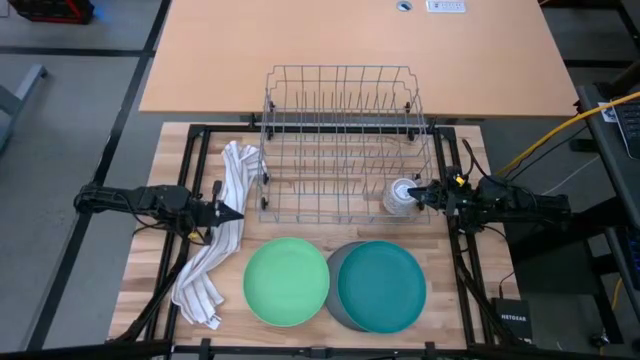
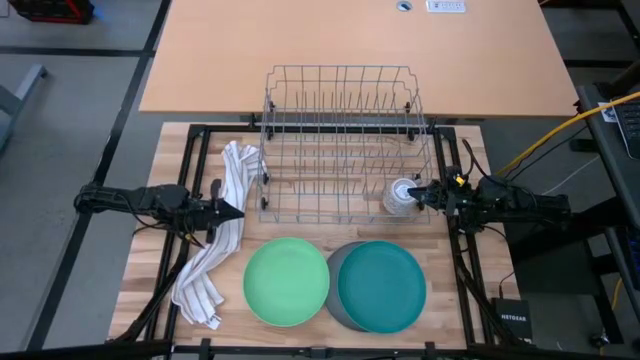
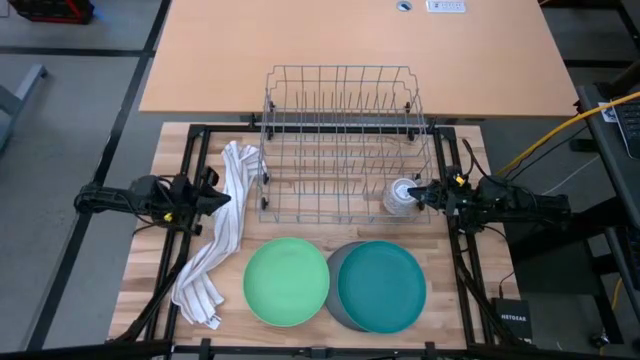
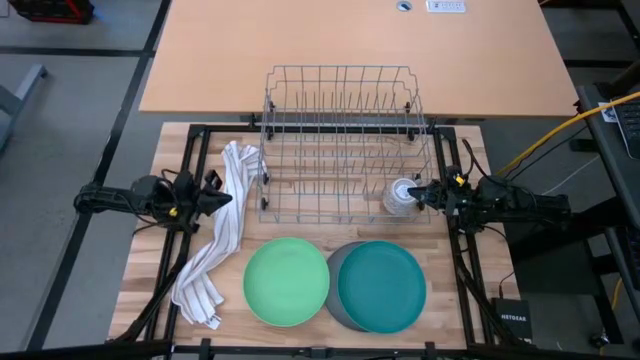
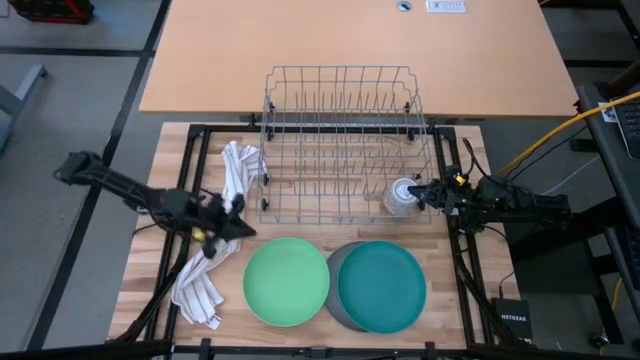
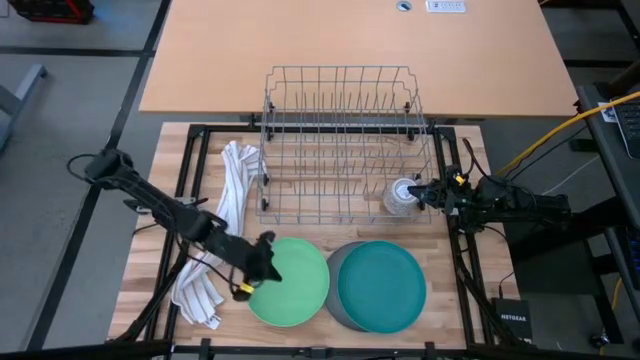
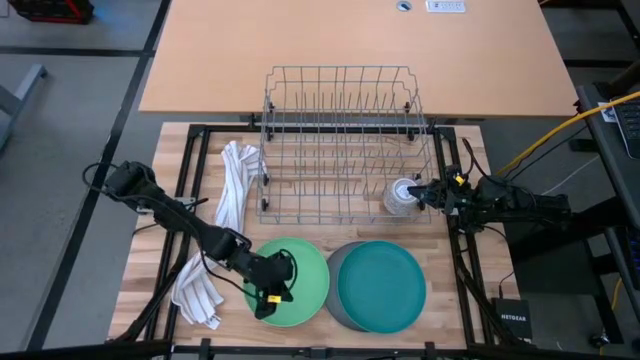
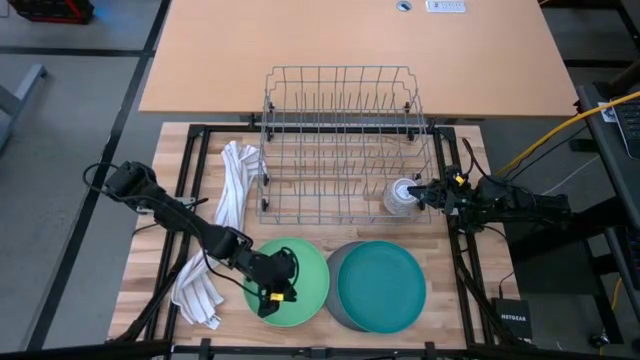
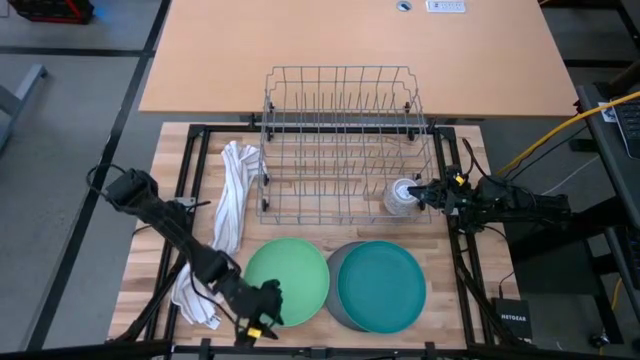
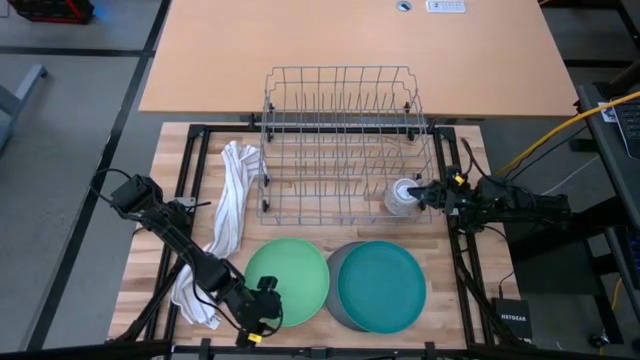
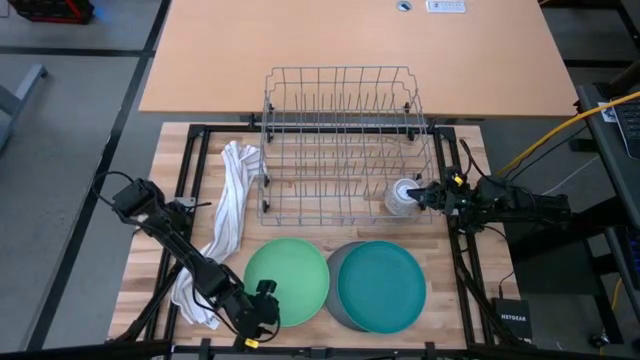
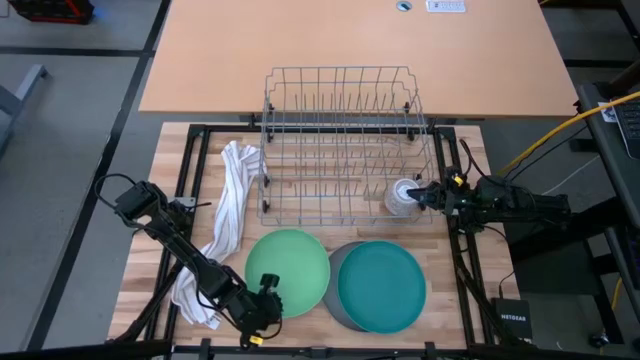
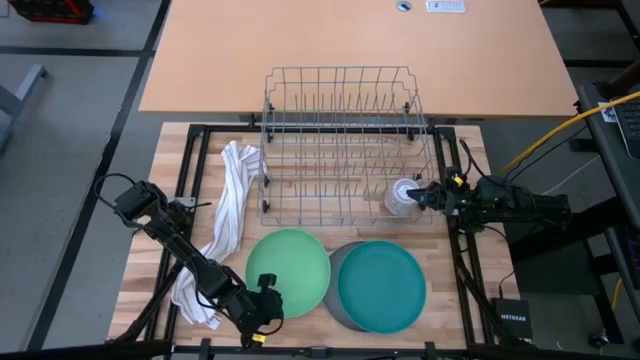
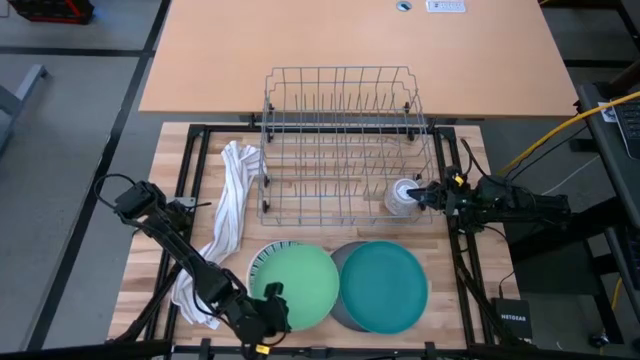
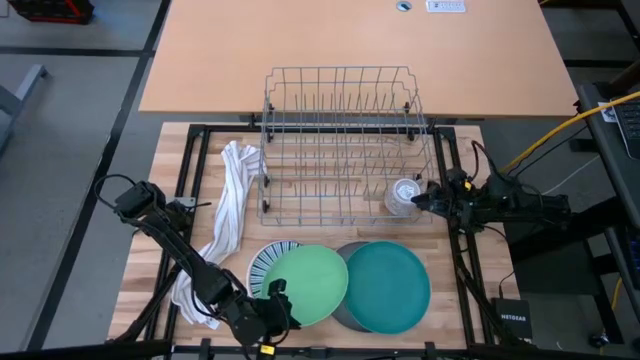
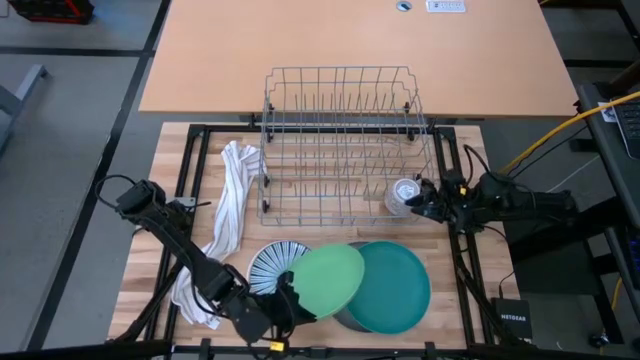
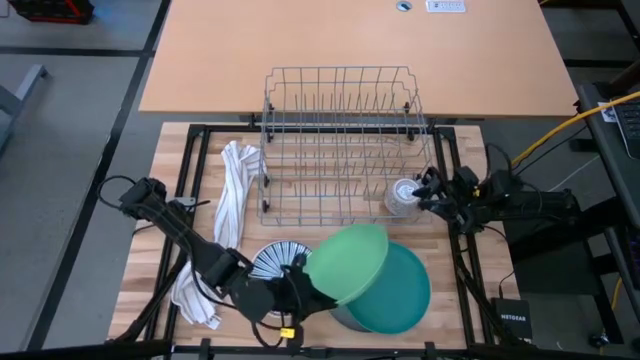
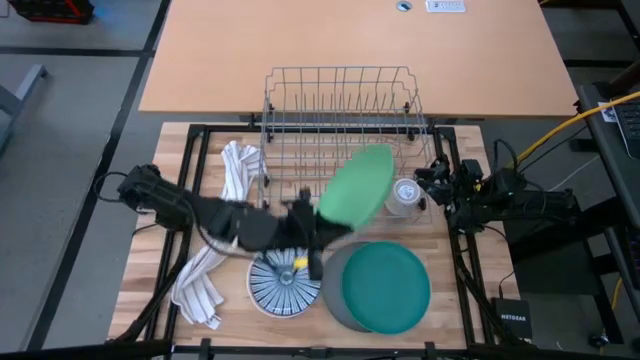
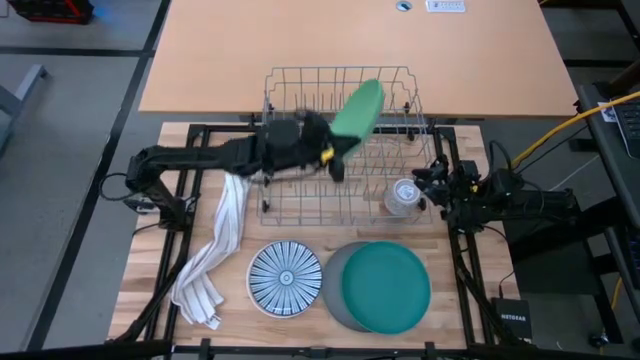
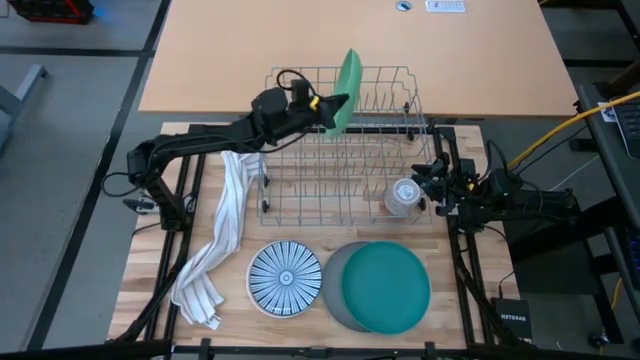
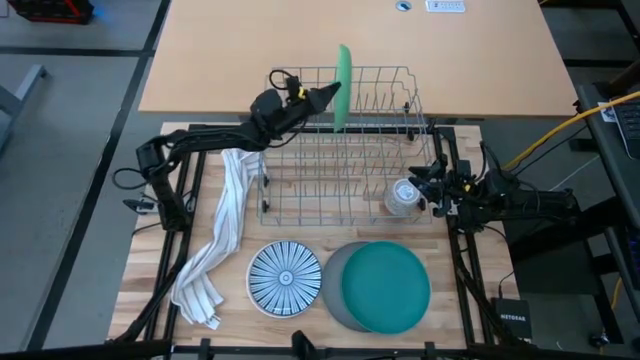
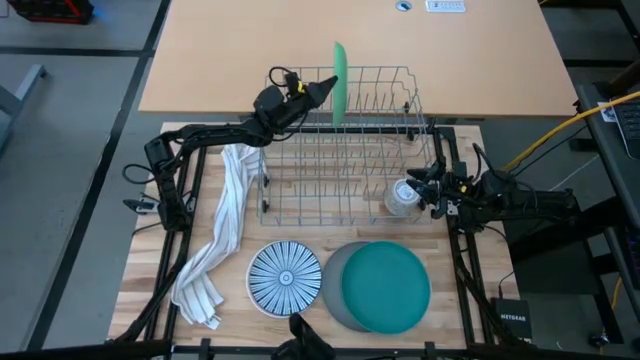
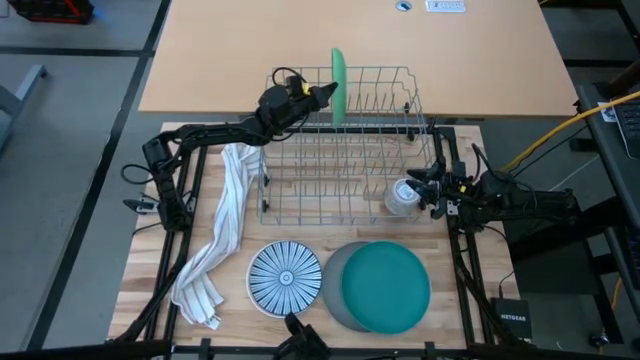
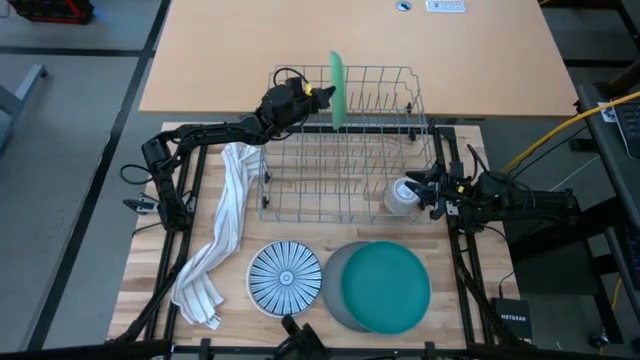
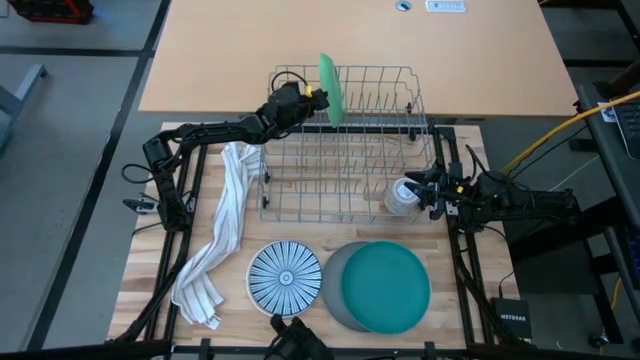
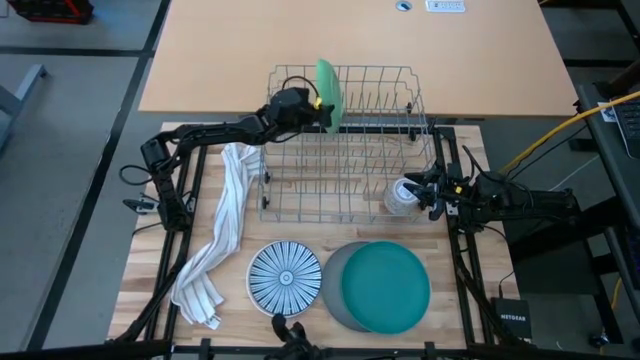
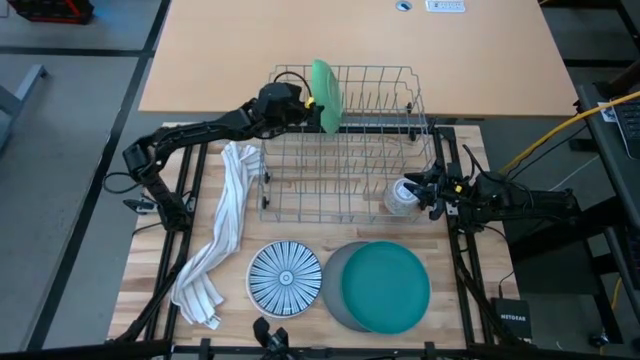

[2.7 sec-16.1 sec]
Task: Sort dishes
Put the light green plate into the dish rack
